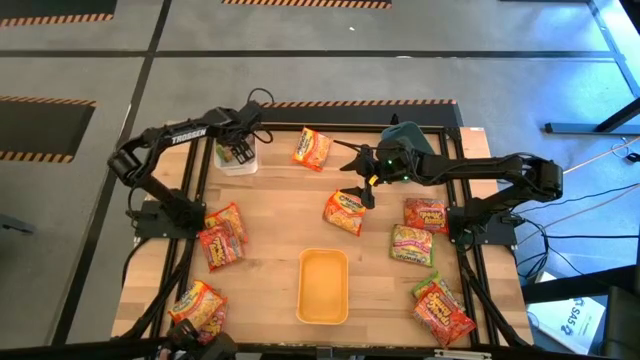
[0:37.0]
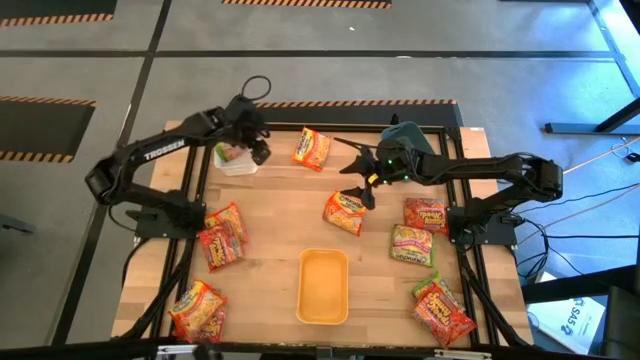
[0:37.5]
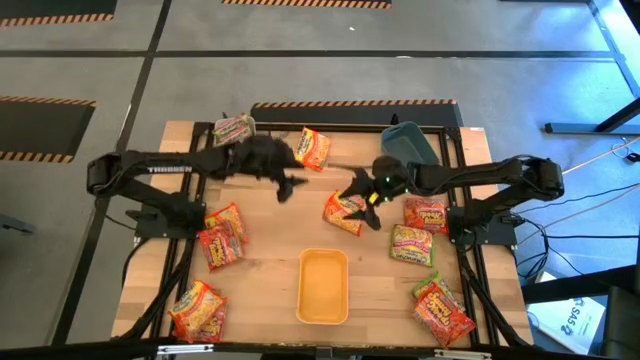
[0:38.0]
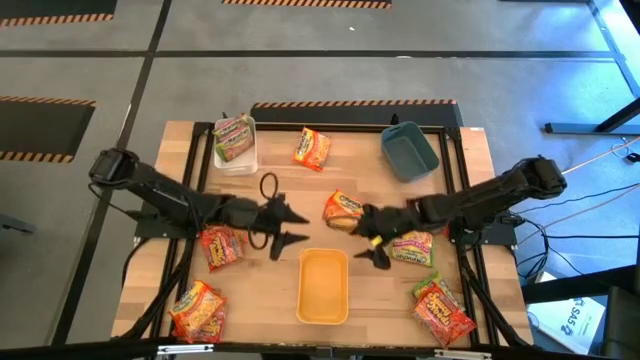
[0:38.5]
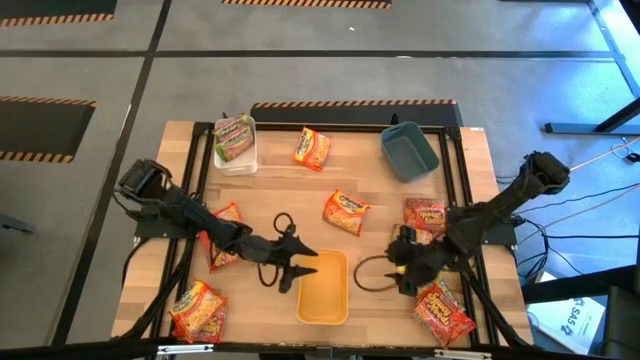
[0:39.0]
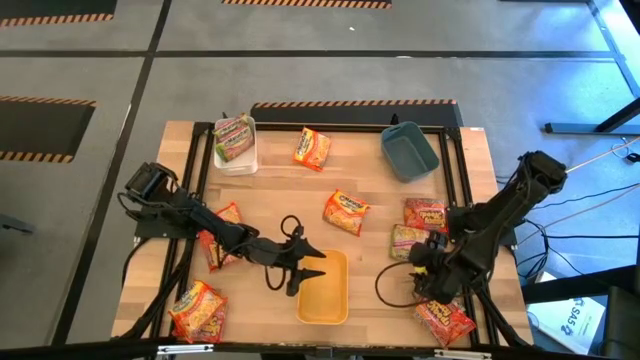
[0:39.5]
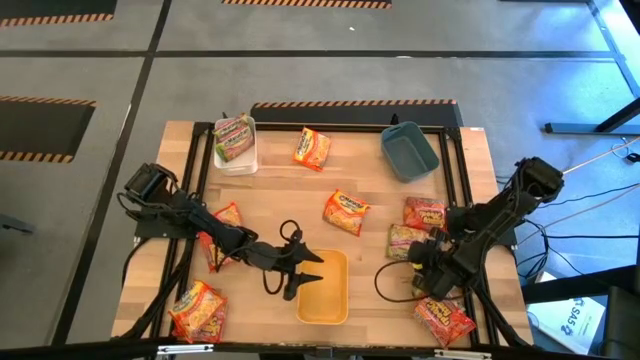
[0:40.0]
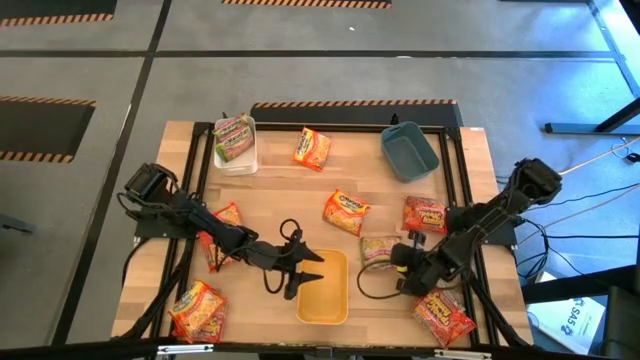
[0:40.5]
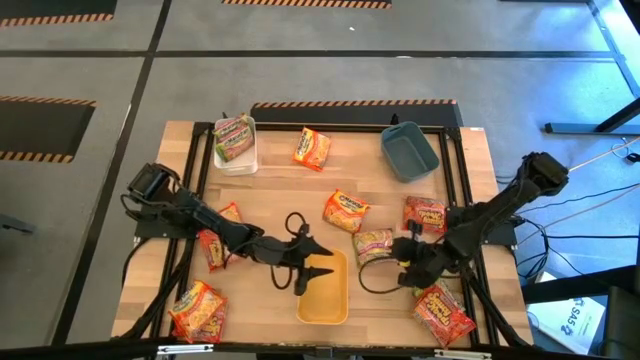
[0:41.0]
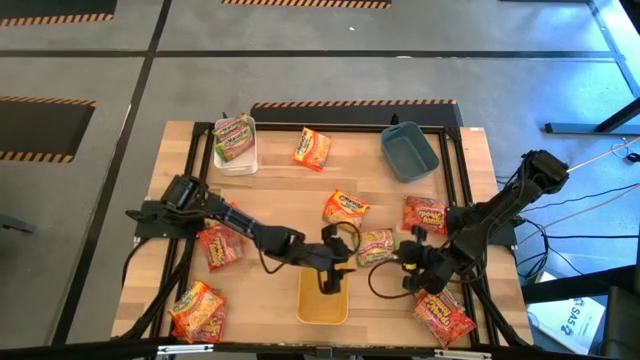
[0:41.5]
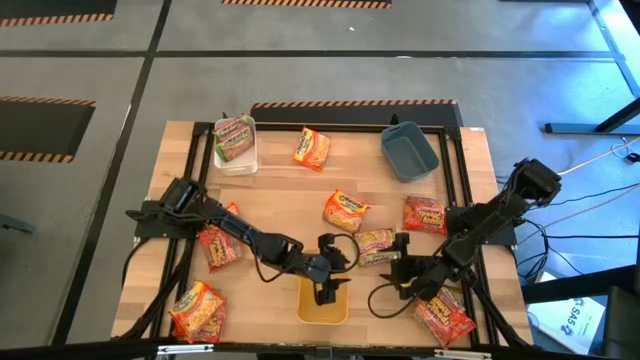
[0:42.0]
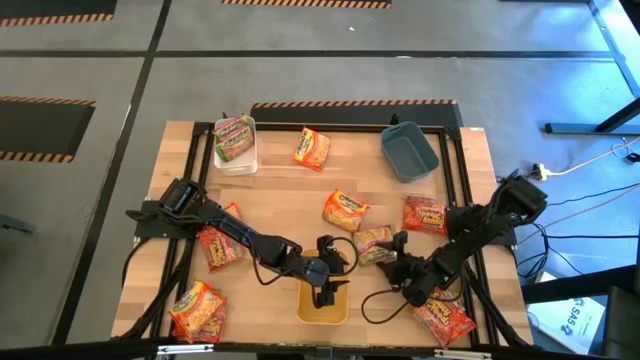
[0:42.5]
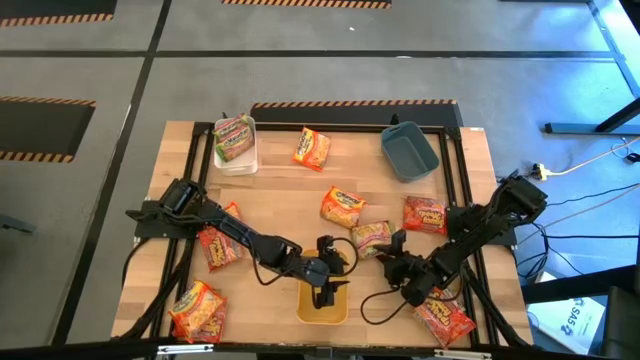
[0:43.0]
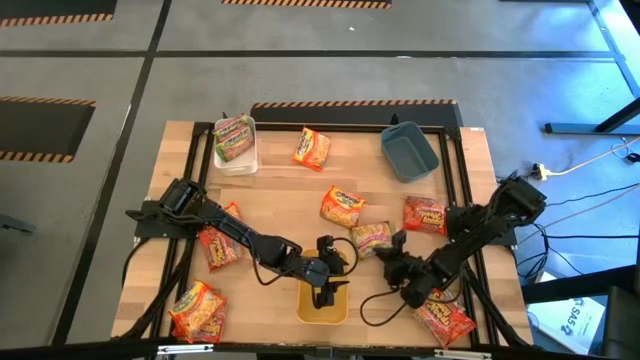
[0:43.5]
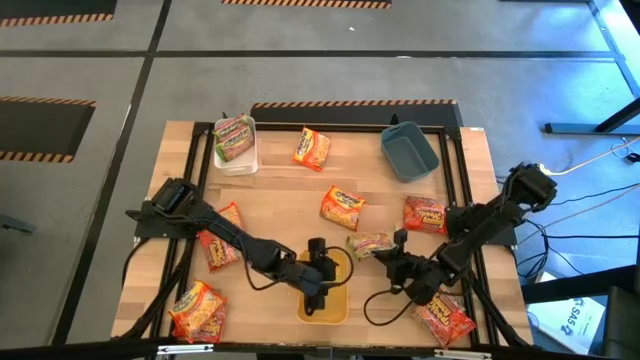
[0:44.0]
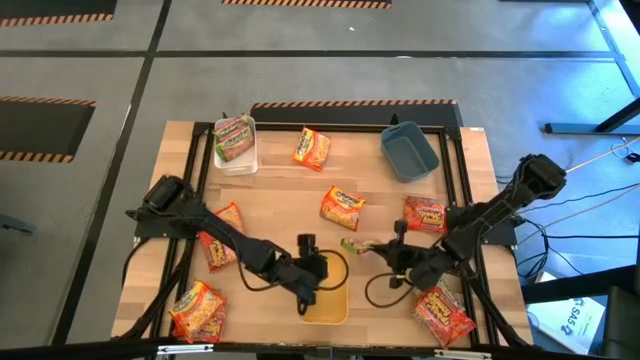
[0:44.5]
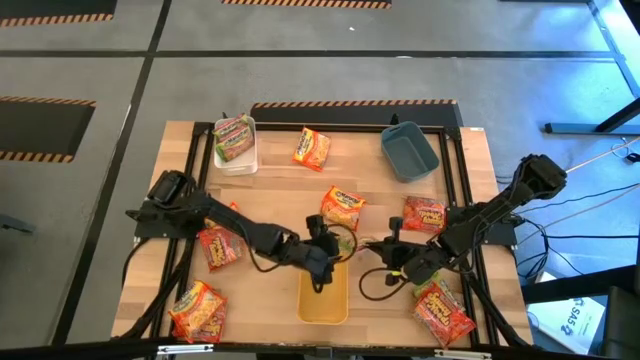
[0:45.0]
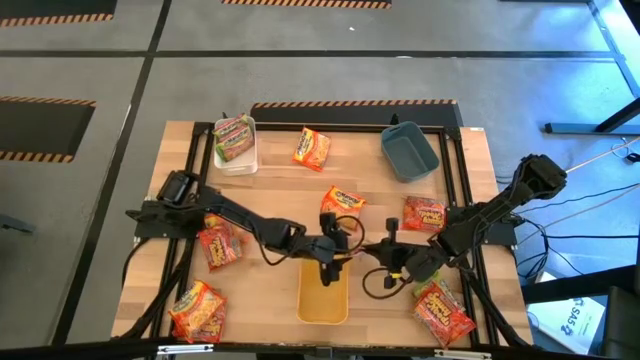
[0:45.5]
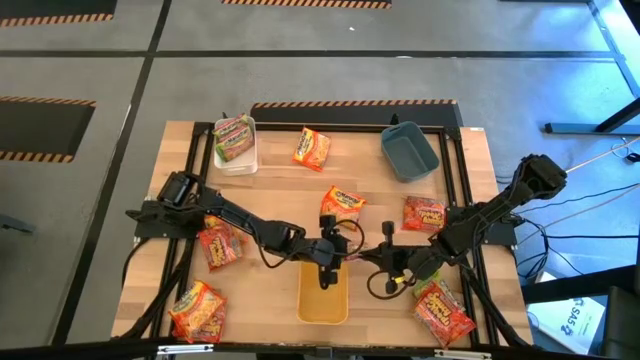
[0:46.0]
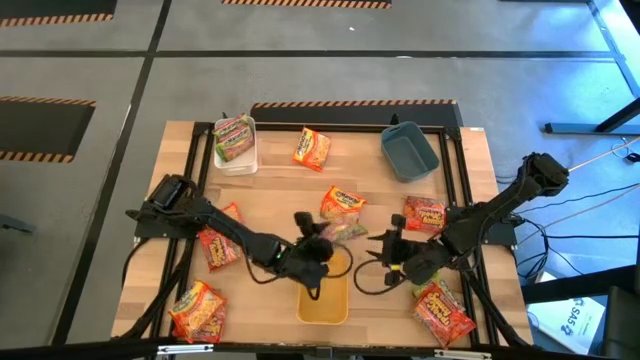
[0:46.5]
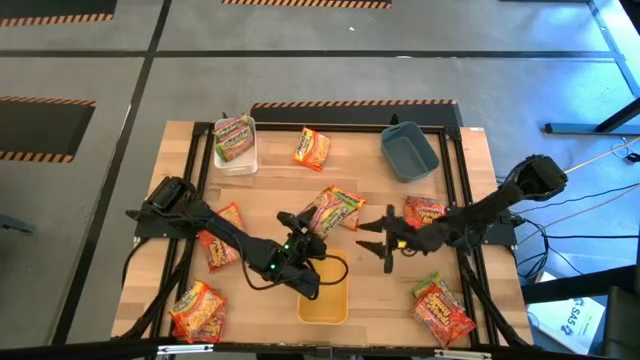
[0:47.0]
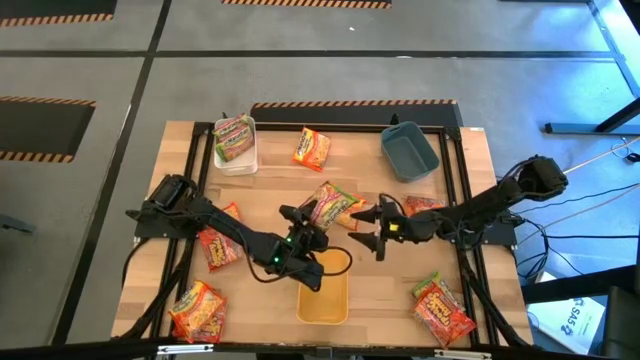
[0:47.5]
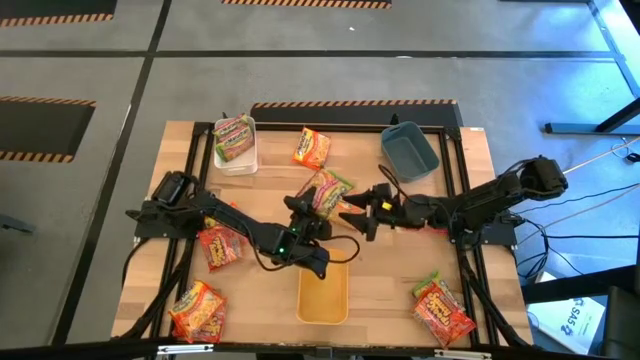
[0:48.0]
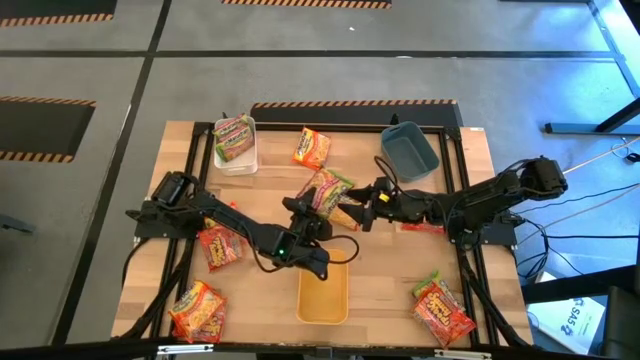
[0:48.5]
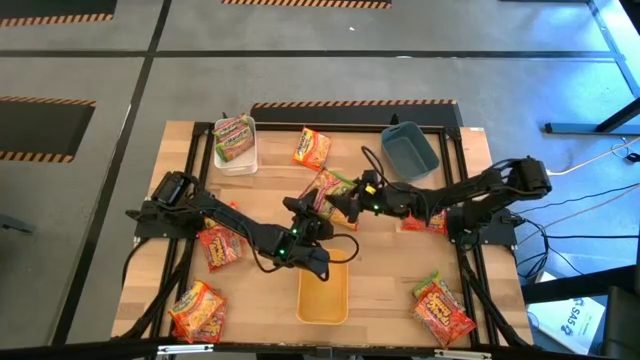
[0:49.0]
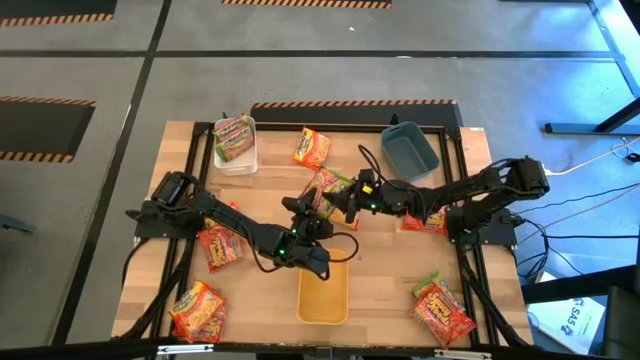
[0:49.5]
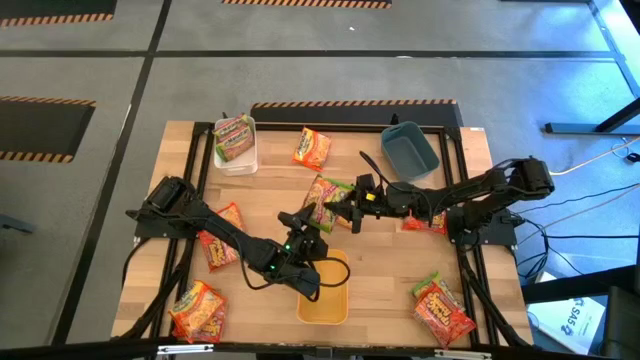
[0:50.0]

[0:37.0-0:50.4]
Task: Sort Maruchan noodles
Put the top green noodle pack into the white bin

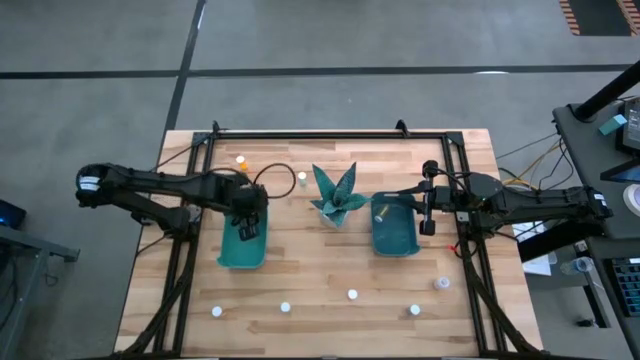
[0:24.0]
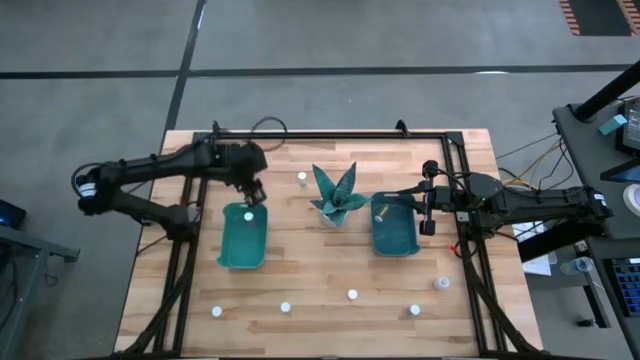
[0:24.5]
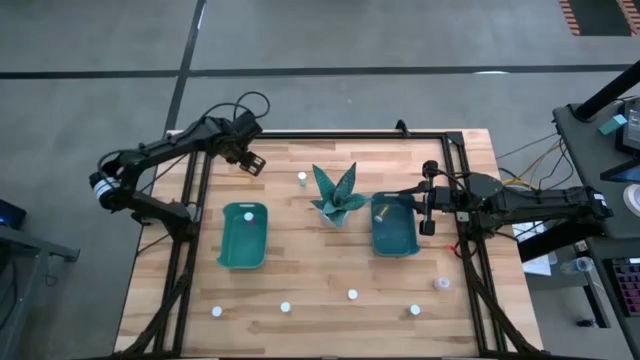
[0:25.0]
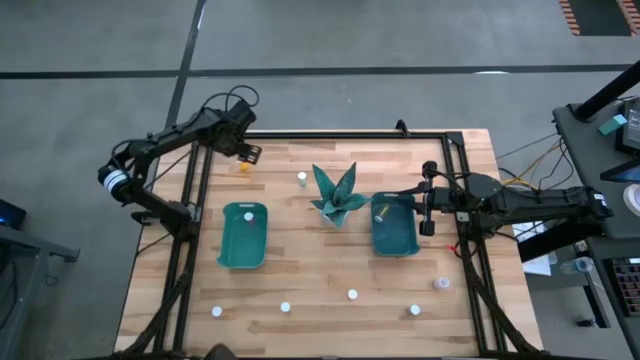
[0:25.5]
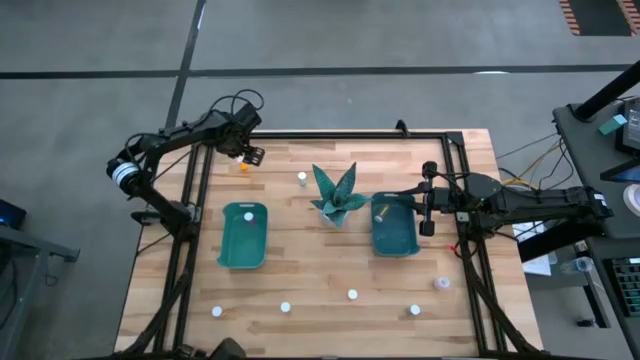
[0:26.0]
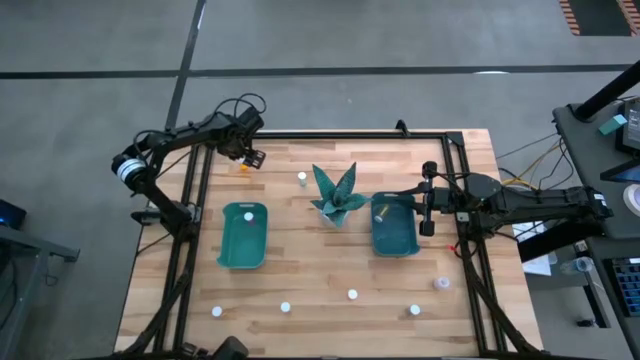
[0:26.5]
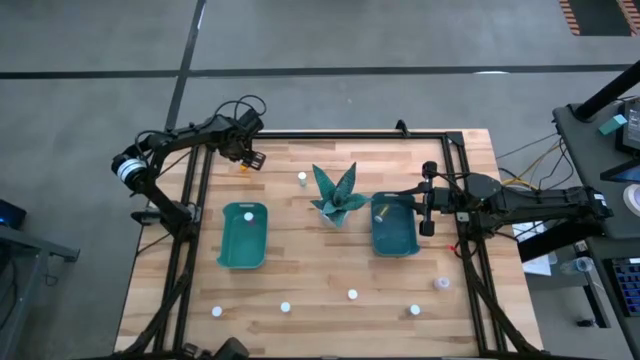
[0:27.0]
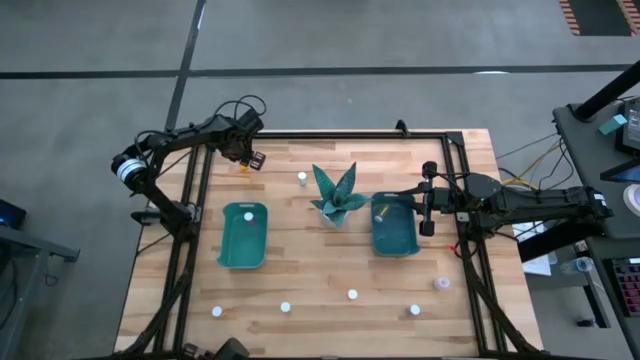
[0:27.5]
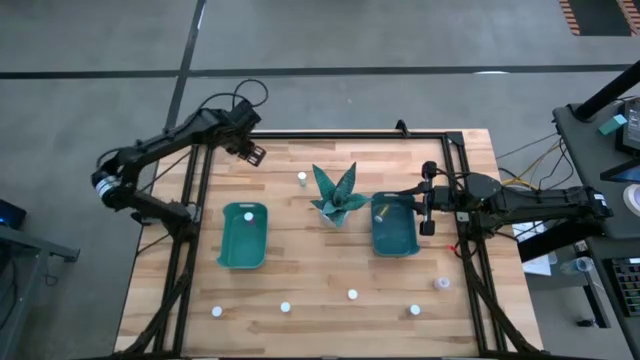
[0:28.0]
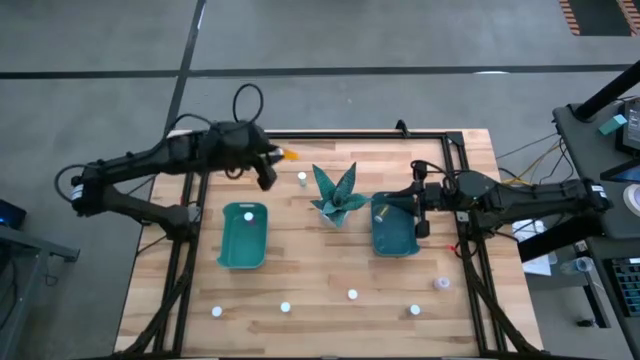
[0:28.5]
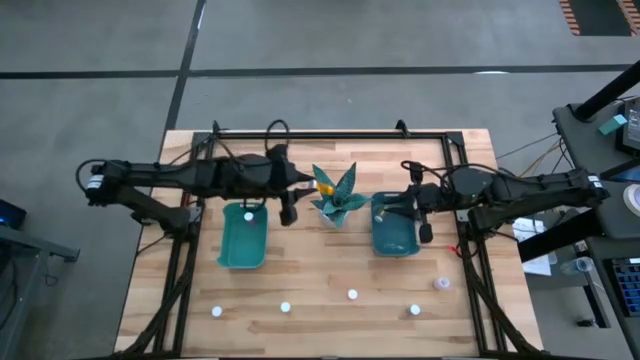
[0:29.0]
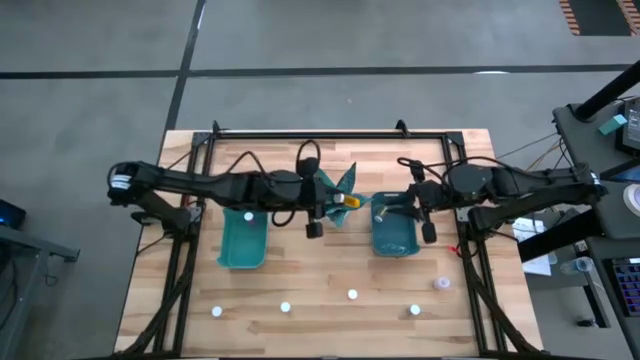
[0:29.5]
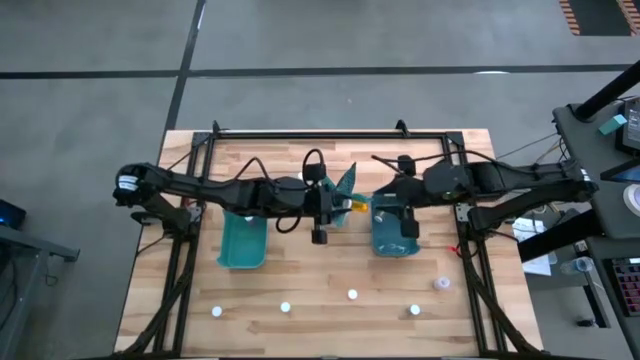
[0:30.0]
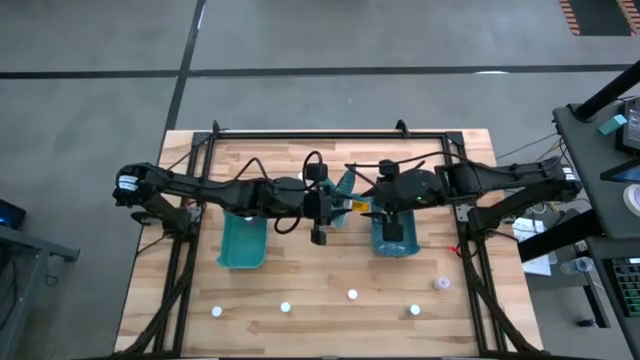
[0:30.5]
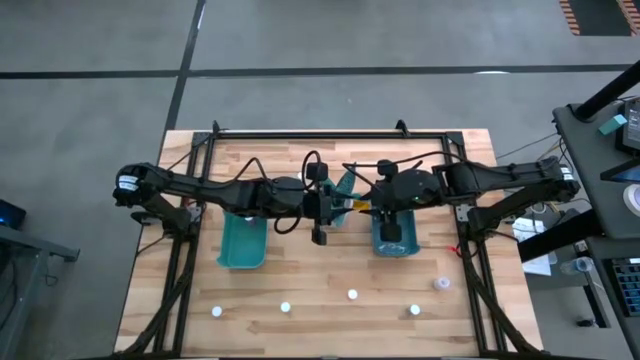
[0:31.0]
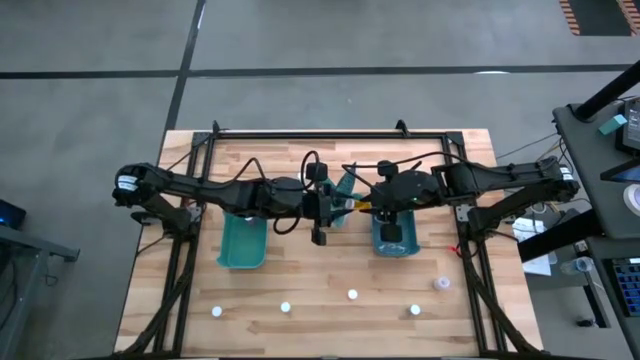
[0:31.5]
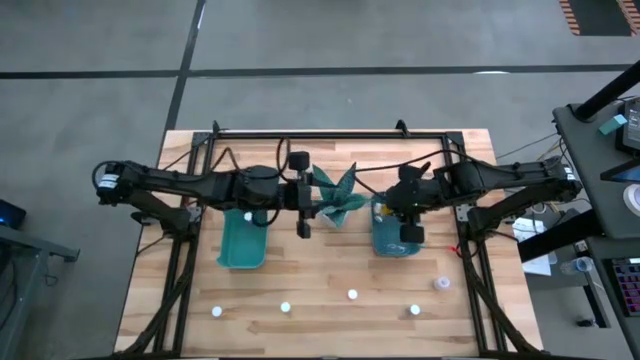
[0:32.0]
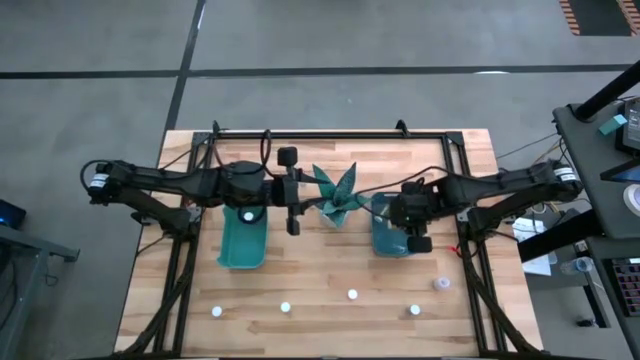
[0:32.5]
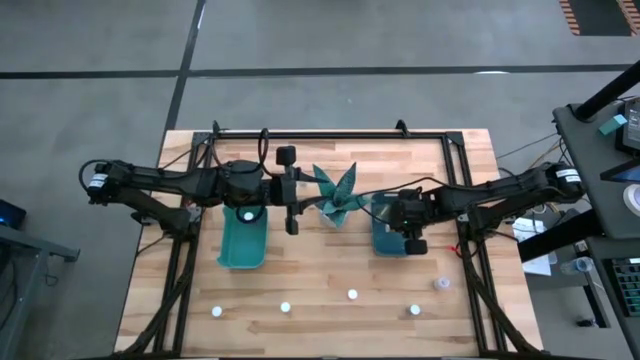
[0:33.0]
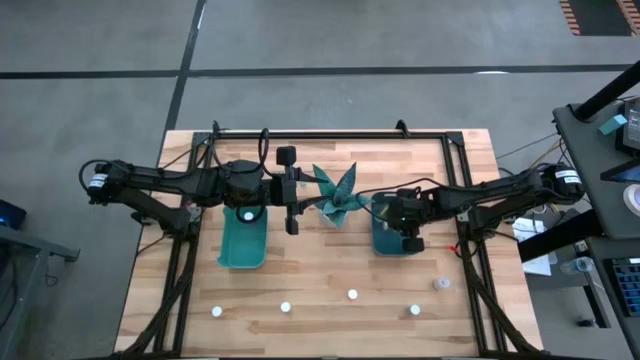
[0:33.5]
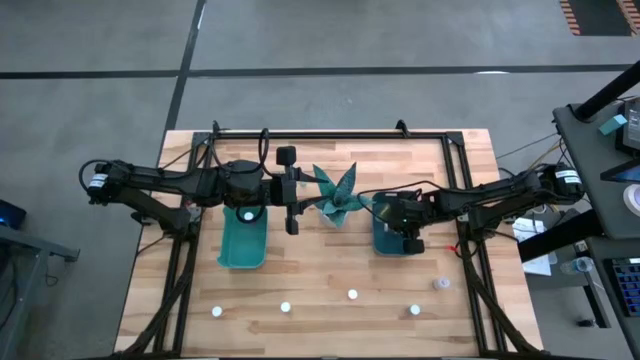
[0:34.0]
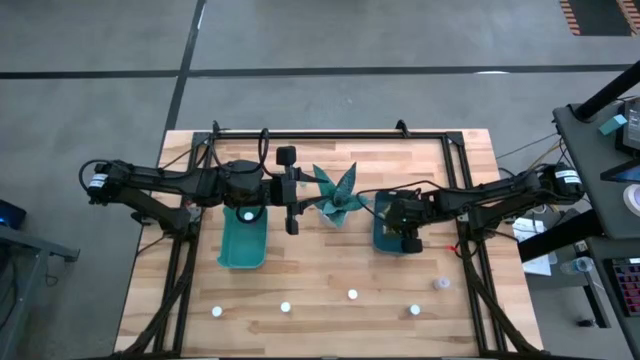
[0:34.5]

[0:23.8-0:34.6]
Task: Pick and place medicine bottles into bin by pill shape (circle, oval)
Put the orange tablet bottle into the blue bin
